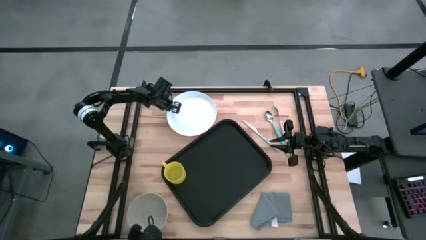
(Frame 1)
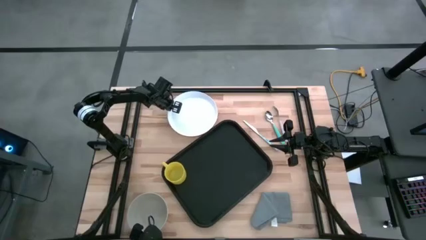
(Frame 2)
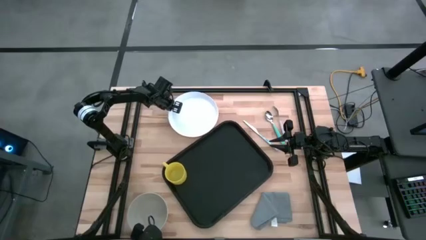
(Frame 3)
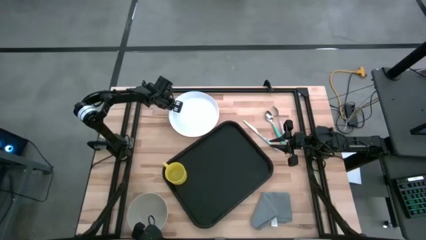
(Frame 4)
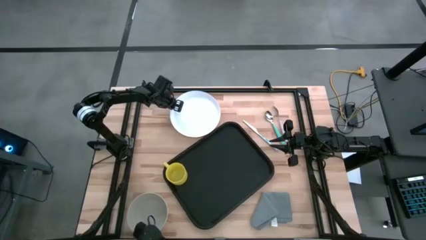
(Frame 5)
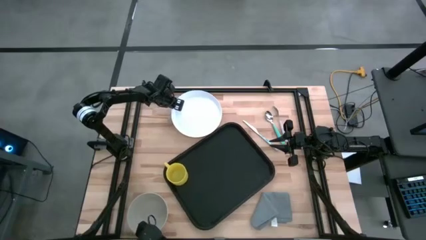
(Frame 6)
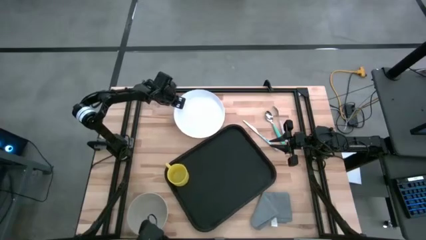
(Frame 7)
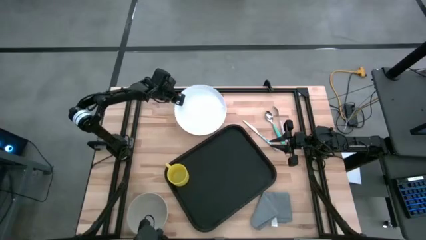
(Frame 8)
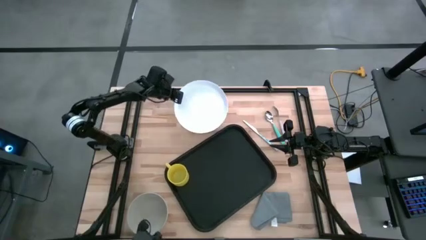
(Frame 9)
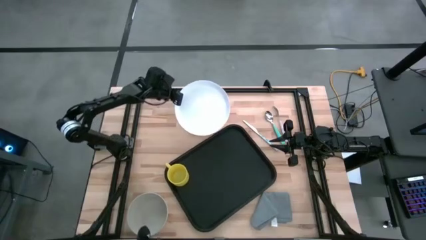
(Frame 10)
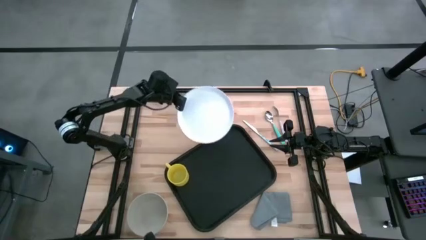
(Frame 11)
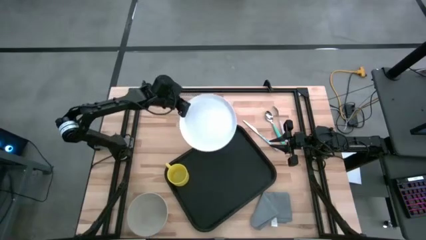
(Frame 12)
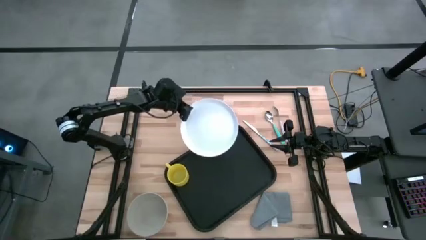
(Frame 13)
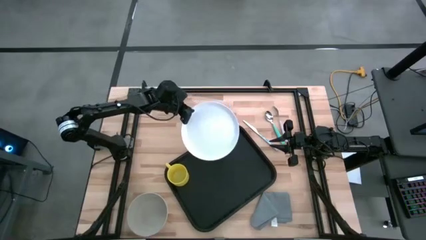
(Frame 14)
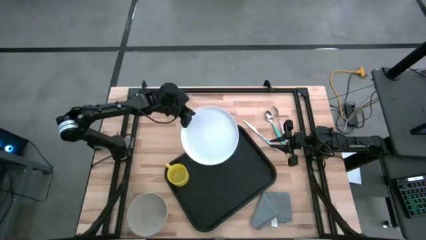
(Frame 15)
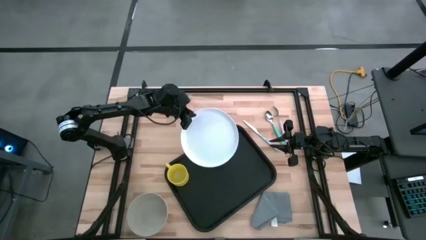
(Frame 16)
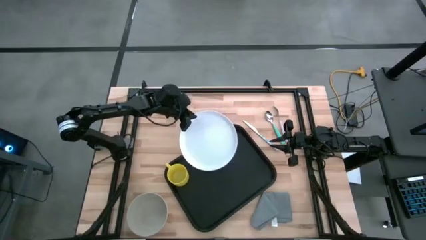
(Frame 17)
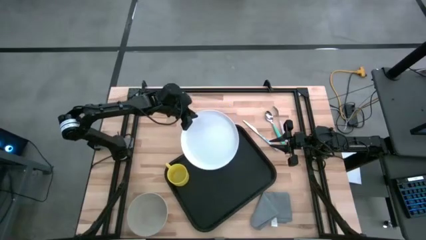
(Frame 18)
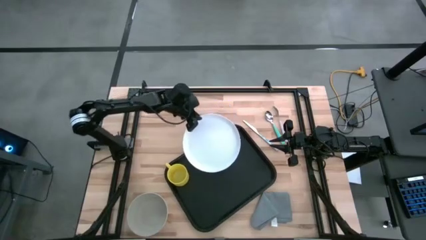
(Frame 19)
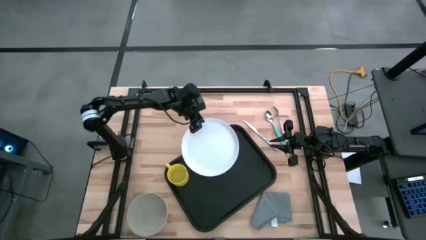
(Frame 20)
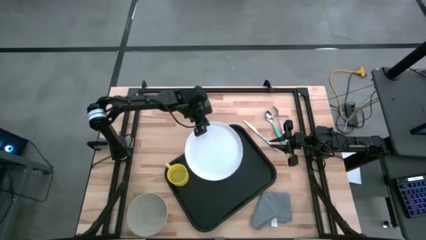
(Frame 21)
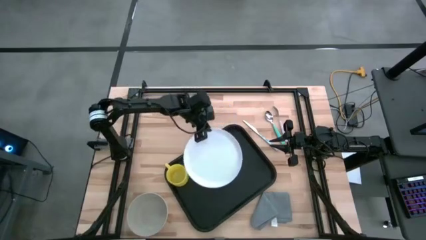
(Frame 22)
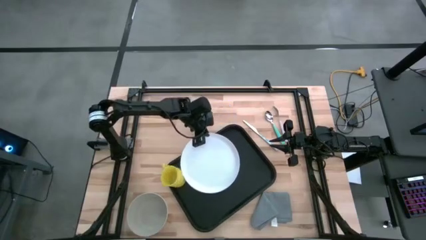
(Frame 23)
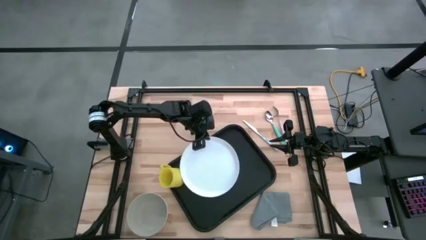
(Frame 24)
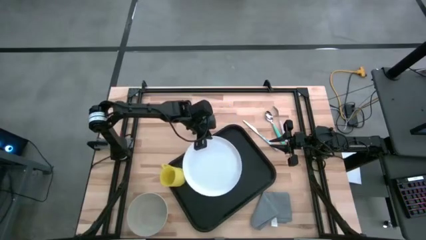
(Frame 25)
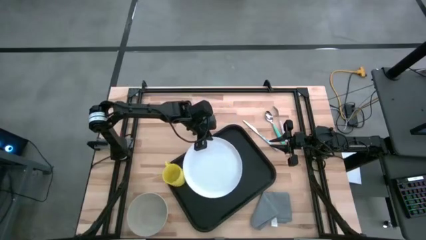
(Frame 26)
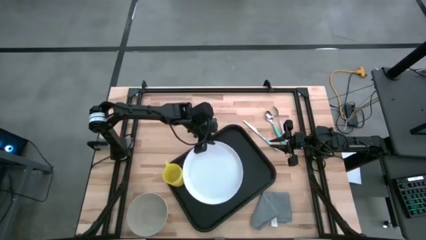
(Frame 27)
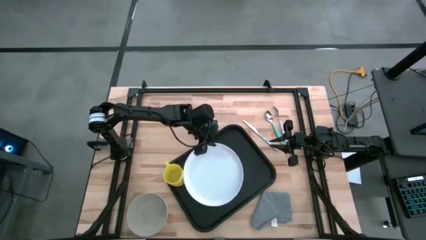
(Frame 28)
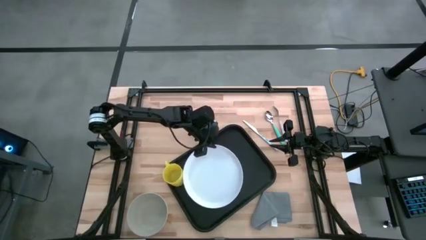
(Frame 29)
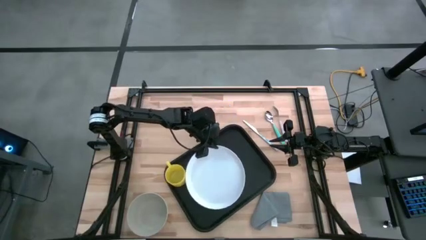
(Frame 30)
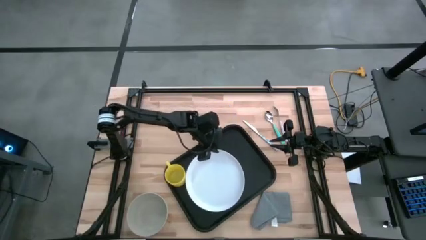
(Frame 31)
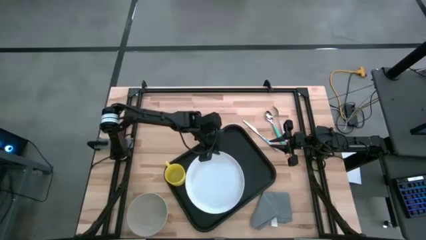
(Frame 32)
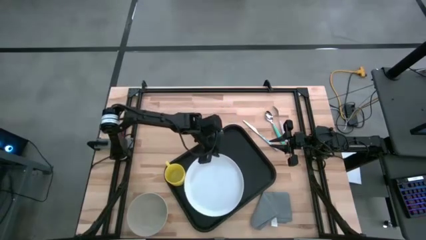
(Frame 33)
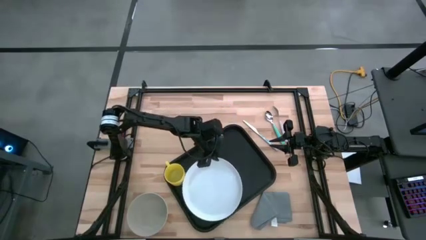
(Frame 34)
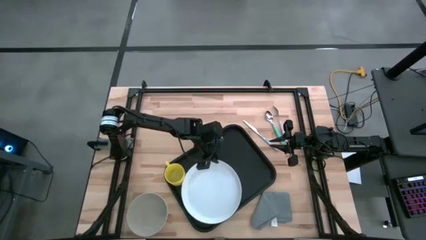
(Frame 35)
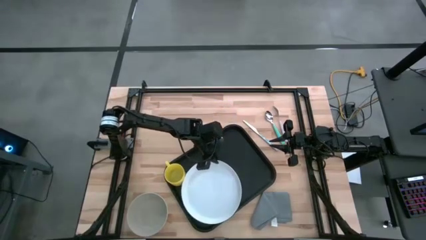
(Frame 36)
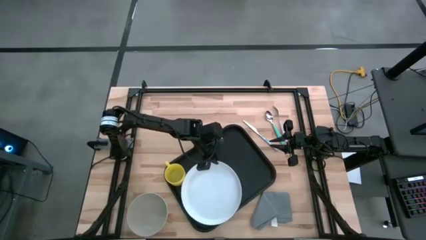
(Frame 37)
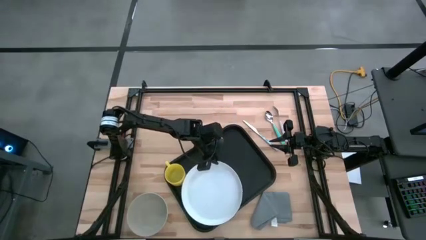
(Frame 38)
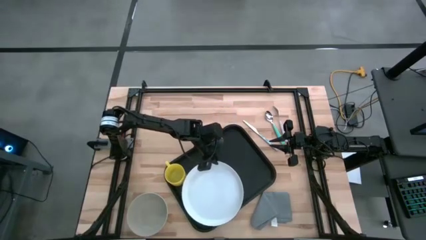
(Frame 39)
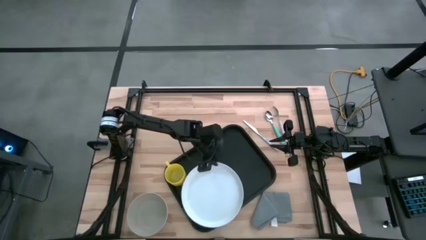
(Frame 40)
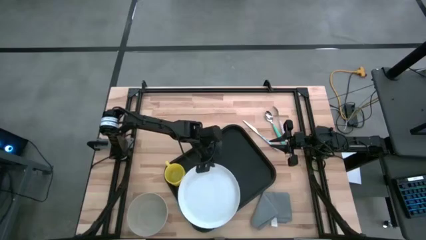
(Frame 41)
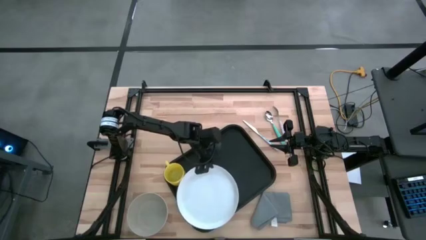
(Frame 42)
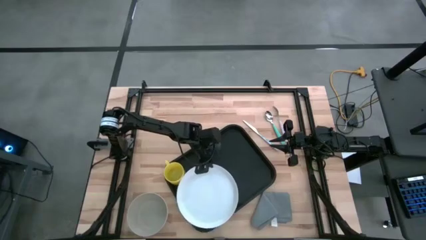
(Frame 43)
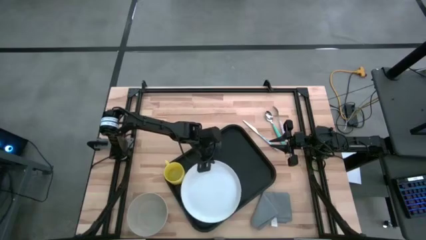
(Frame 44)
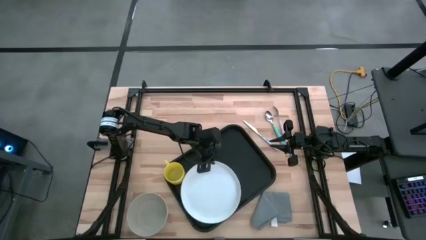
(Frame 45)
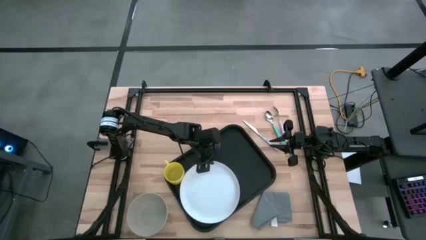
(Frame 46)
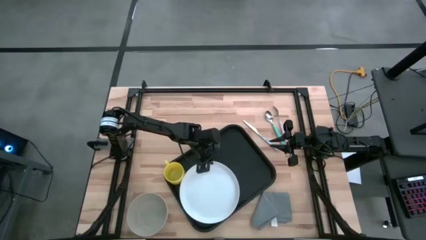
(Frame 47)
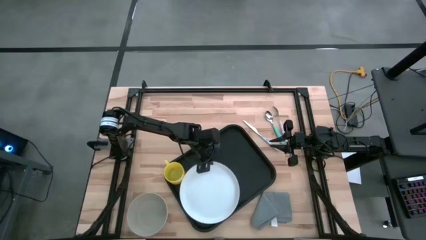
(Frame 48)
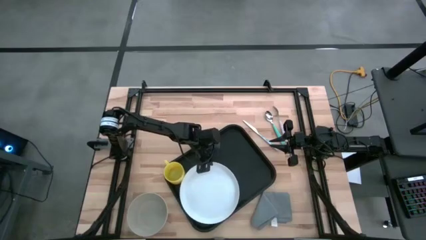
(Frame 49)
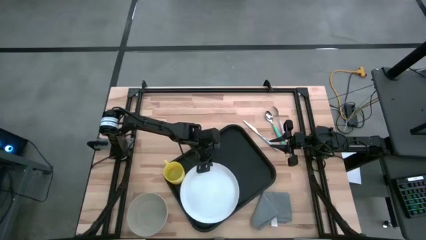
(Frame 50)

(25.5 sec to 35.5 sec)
Task: Set up tray
Put the white plate on the black serving tray
